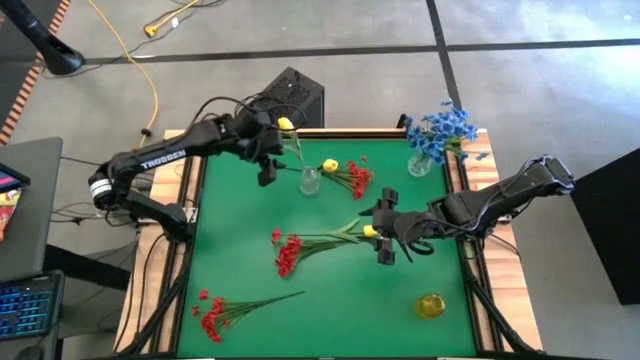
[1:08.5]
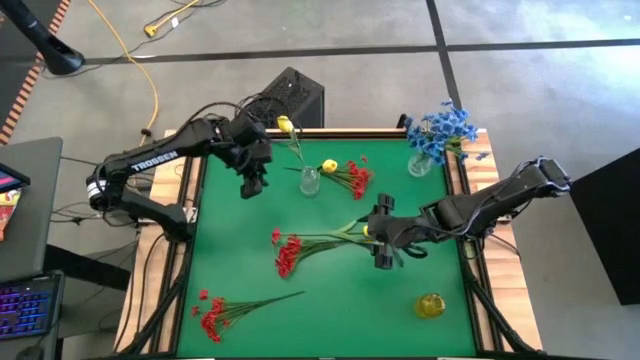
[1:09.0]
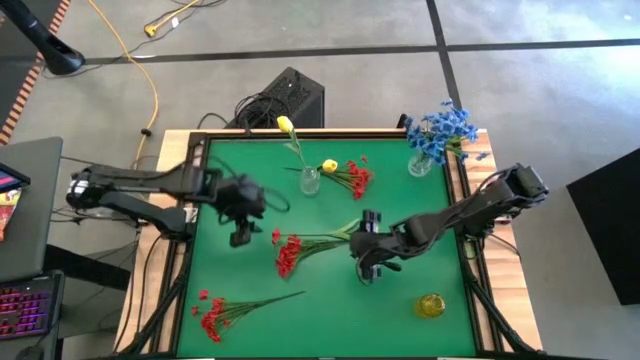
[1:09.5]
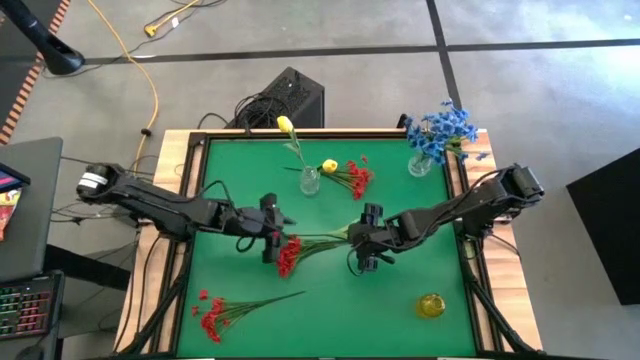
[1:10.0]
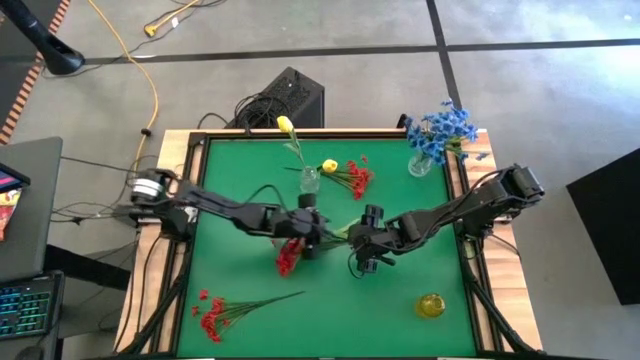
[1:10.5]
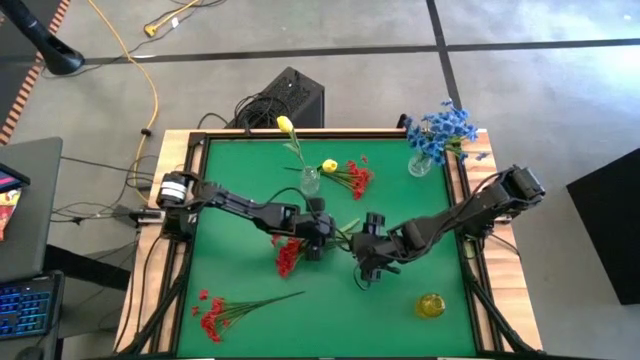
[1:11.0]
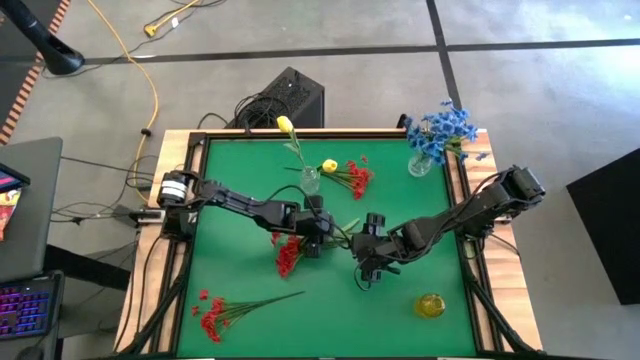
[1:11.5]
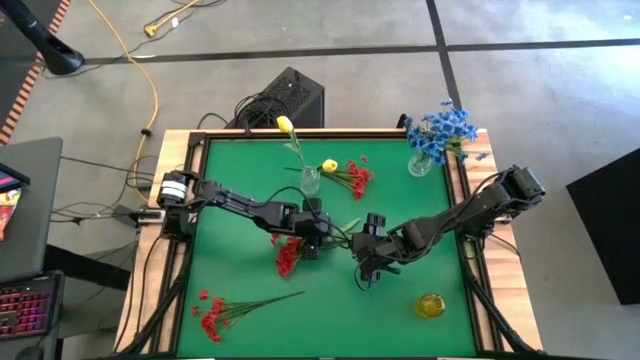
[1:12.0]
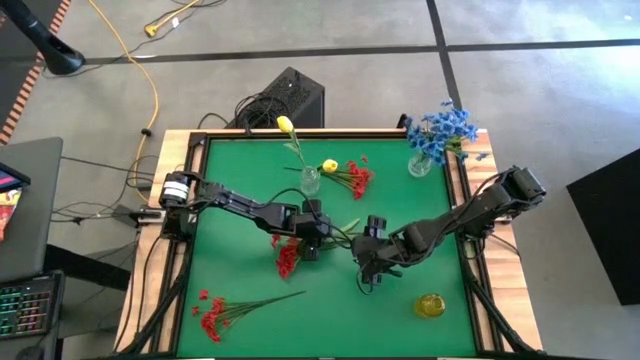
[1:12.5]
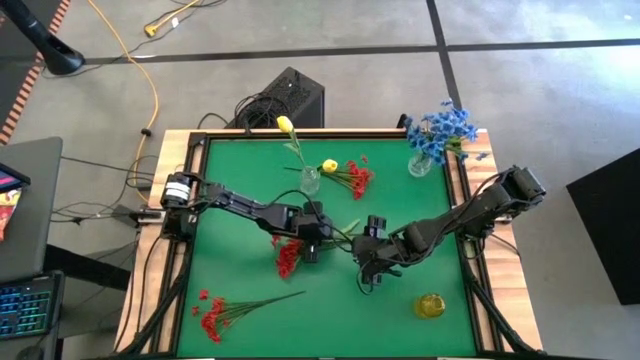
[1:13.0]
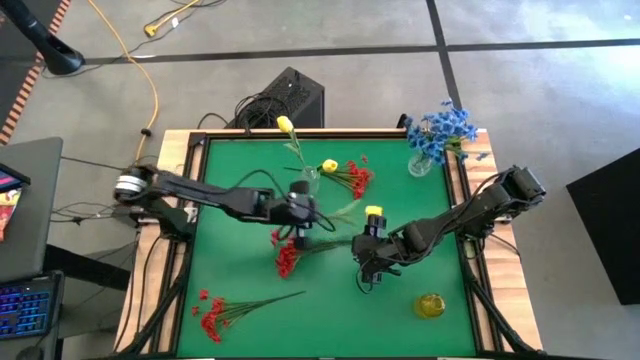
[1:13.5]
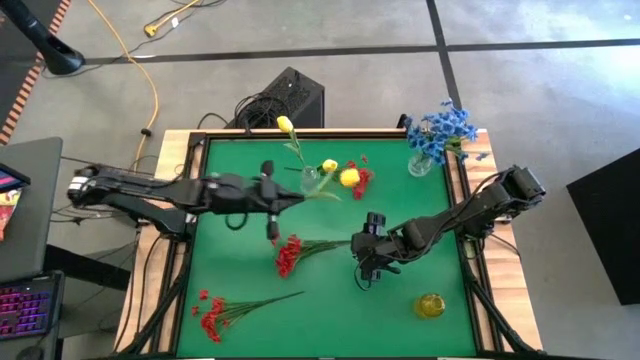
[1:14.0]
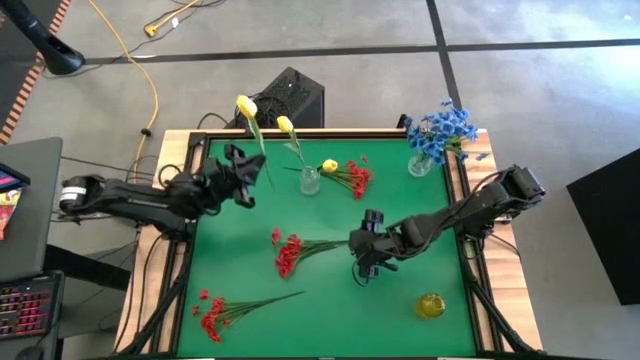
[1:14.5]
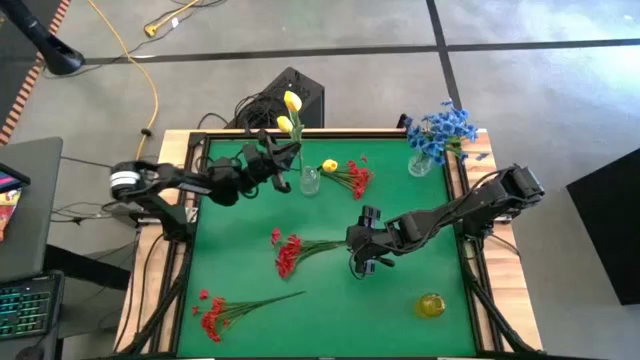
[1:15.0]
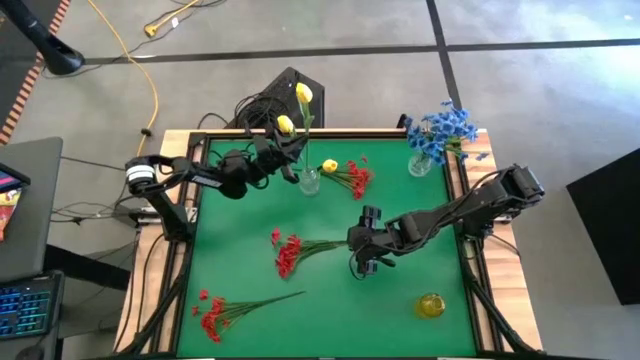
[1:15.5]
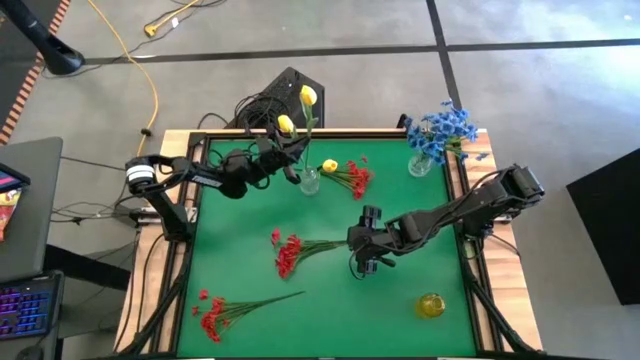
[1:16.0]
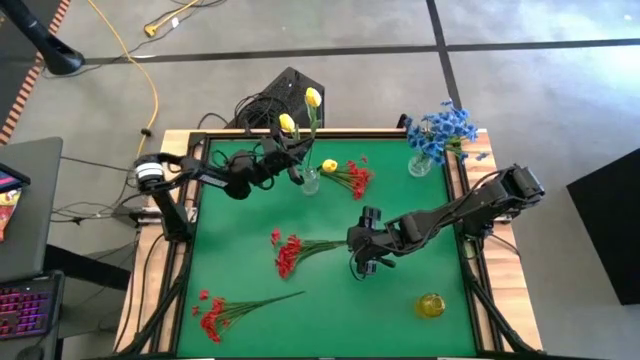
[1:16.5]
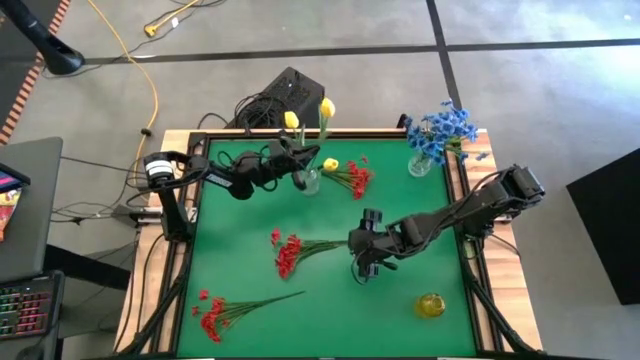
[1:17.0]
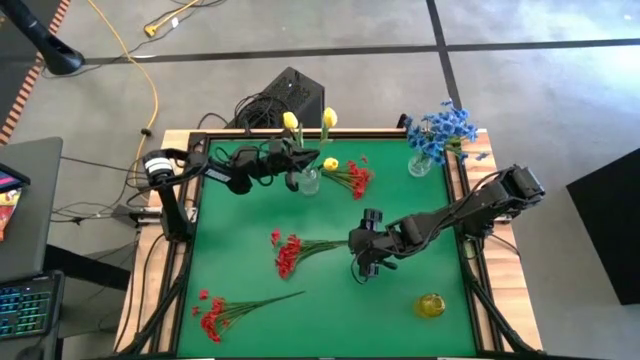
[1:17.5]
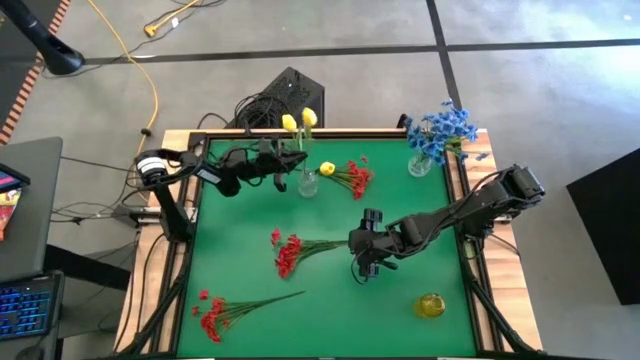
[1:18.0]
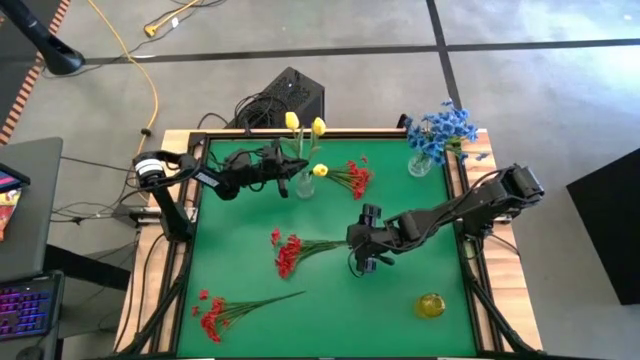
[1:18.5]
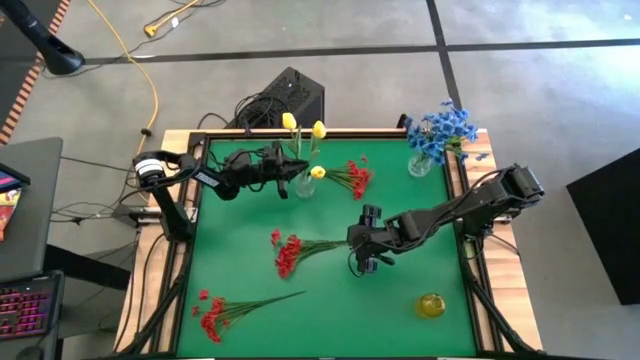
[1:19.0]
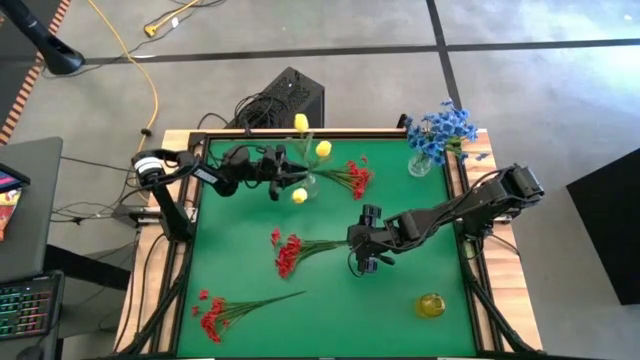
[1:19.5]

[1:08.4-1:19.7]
Task: Sort flowers into vase by color
Put the yellow tulip into the left transparent vase

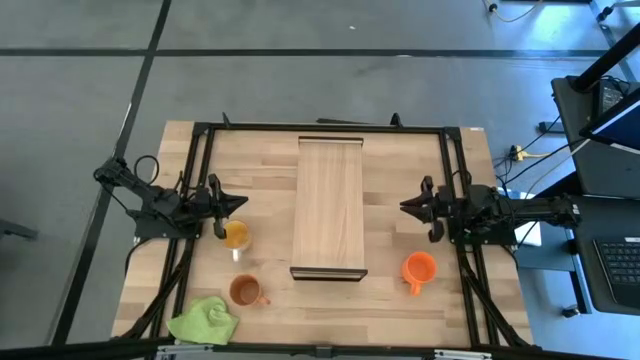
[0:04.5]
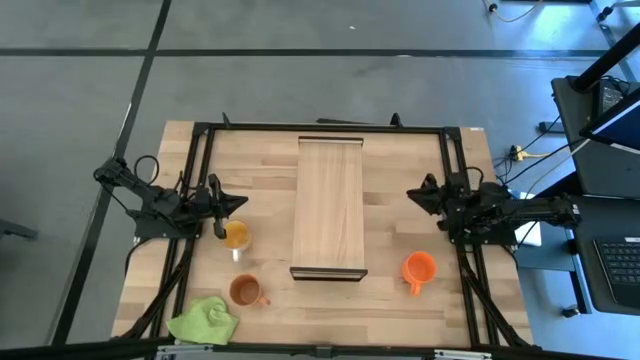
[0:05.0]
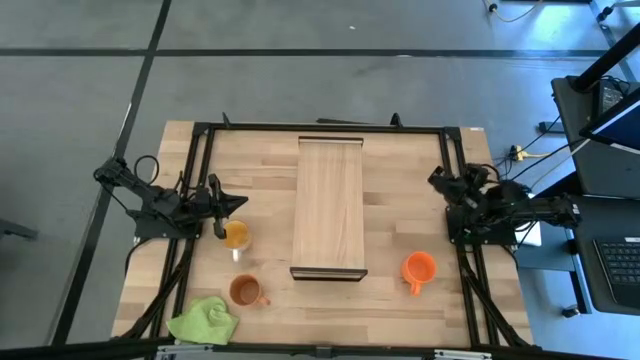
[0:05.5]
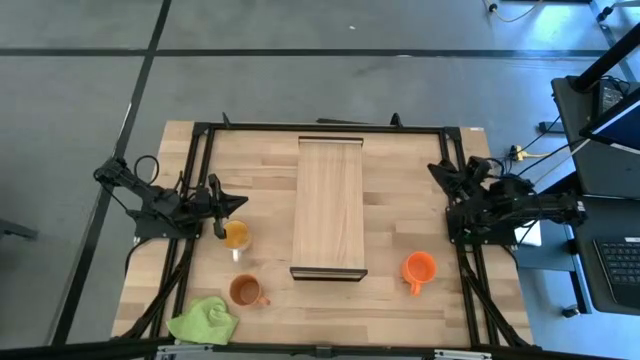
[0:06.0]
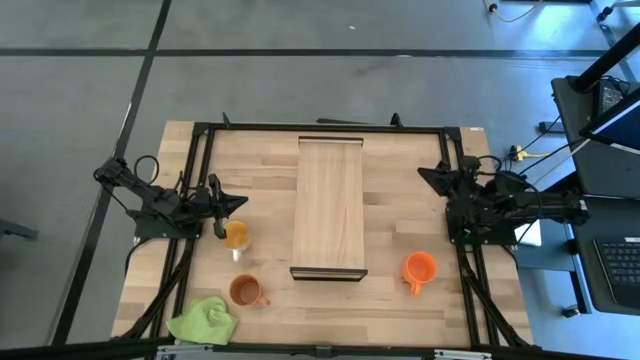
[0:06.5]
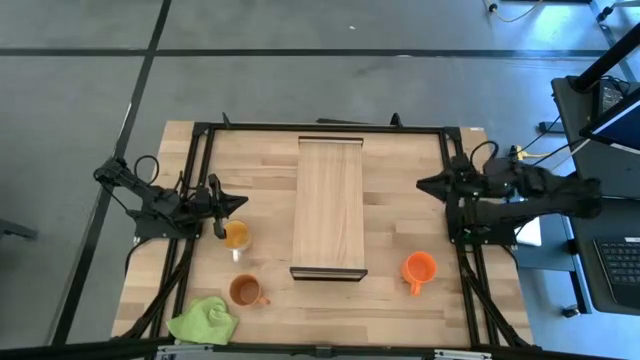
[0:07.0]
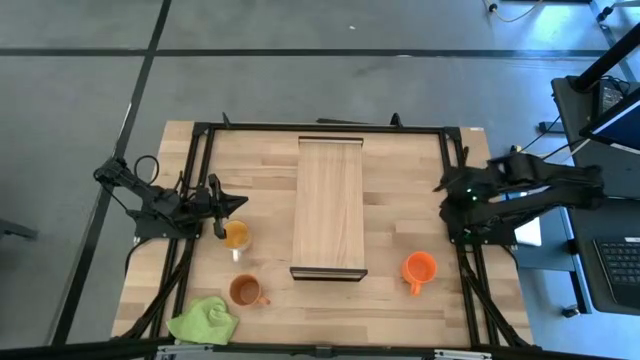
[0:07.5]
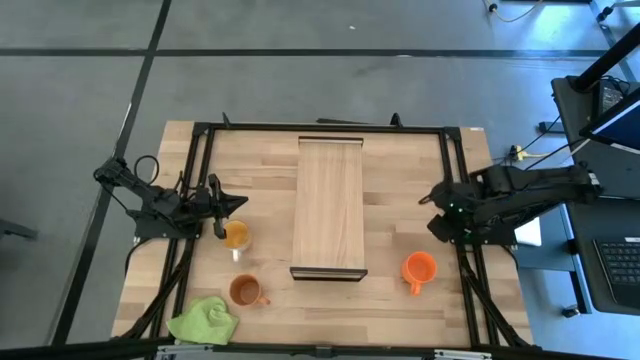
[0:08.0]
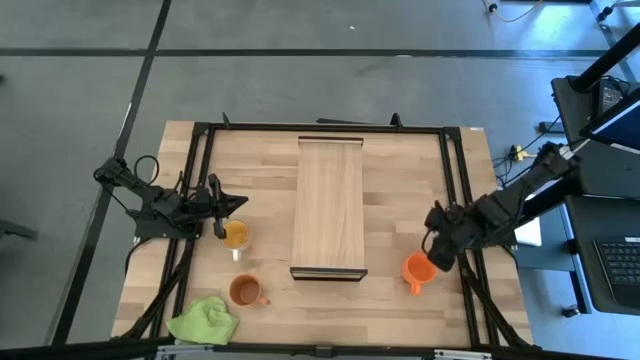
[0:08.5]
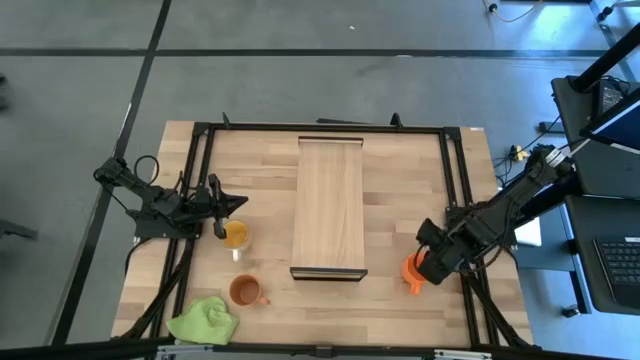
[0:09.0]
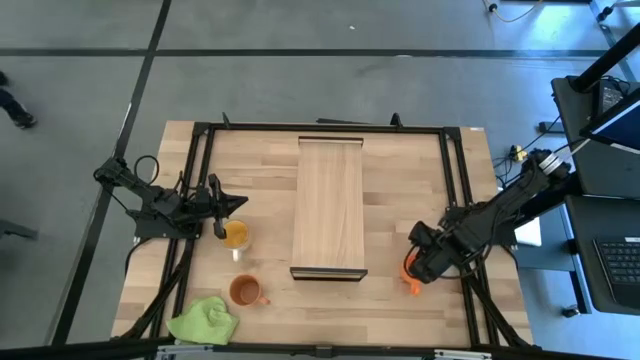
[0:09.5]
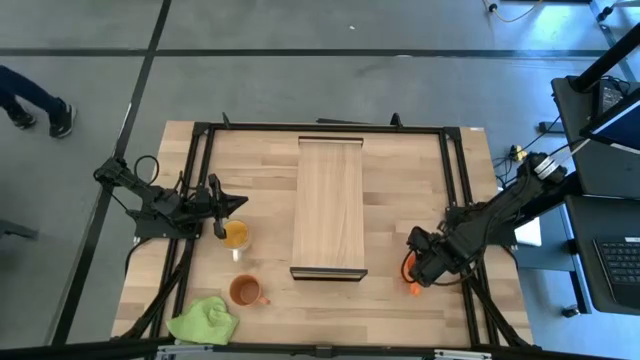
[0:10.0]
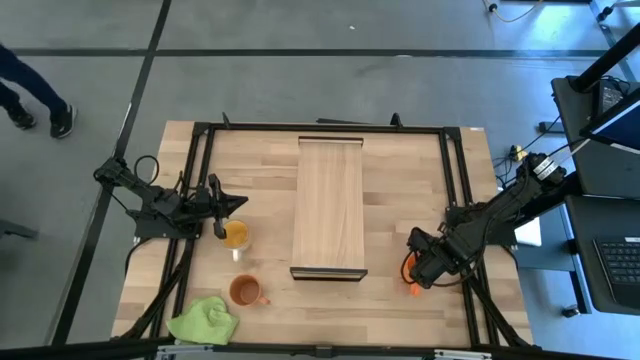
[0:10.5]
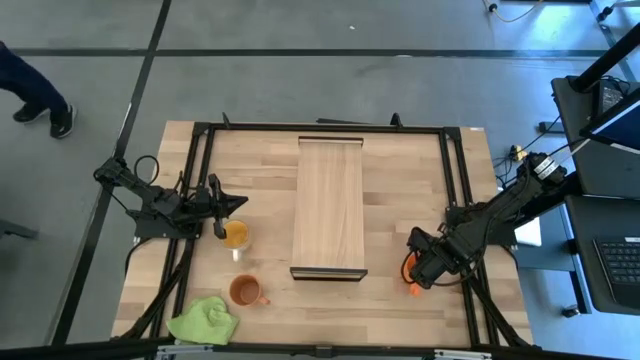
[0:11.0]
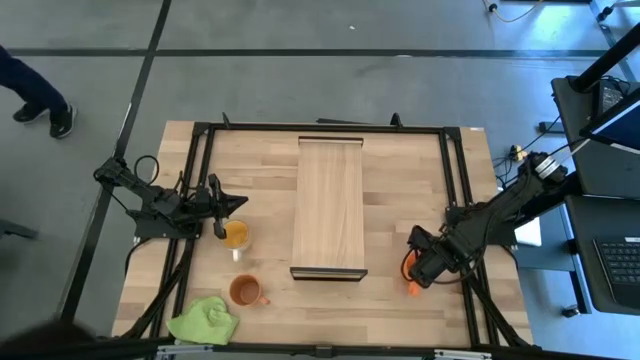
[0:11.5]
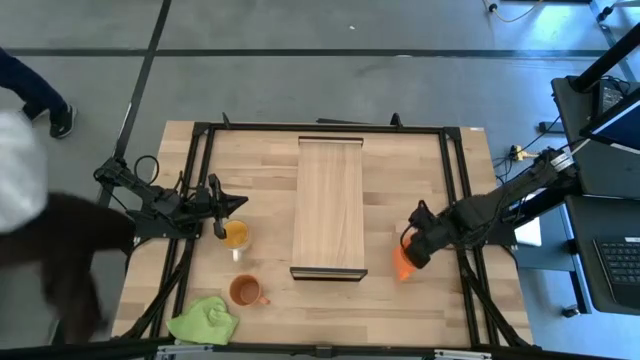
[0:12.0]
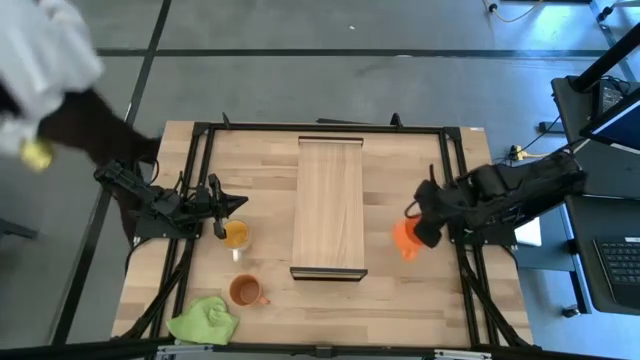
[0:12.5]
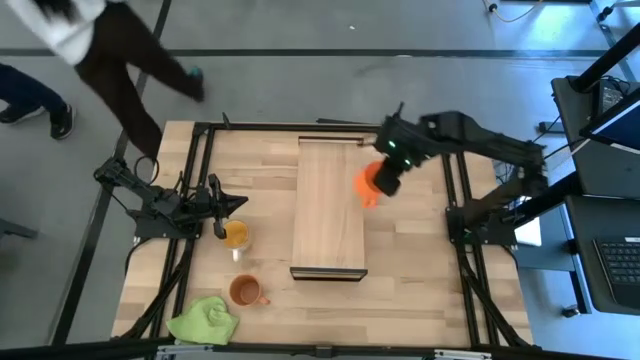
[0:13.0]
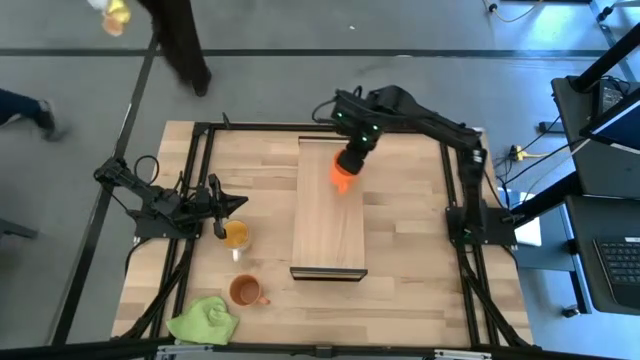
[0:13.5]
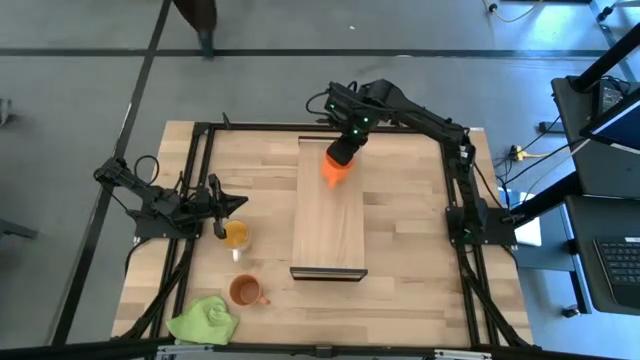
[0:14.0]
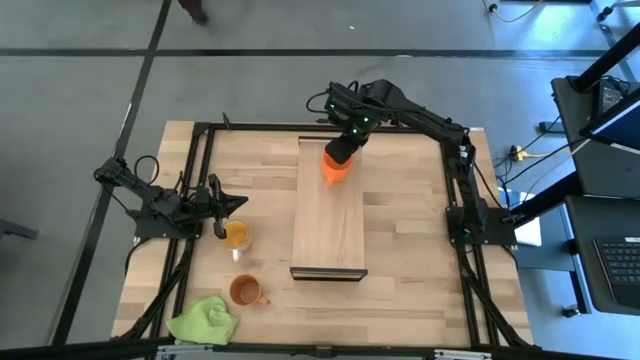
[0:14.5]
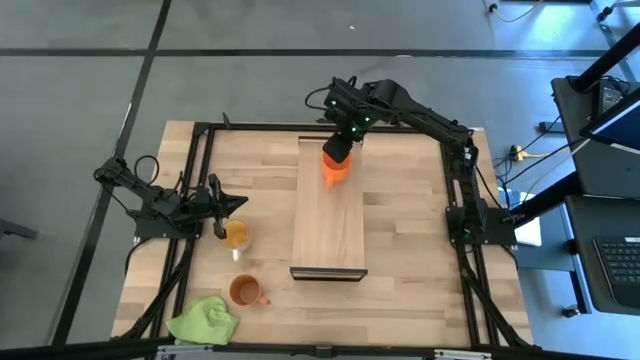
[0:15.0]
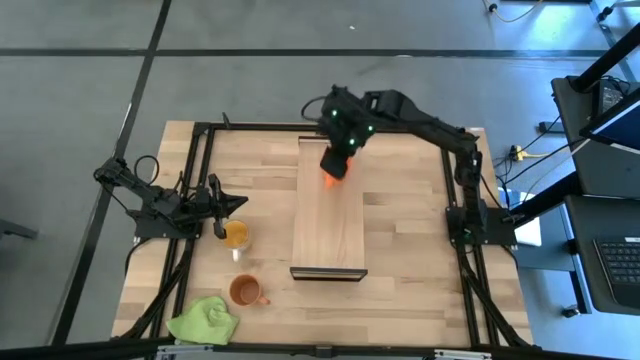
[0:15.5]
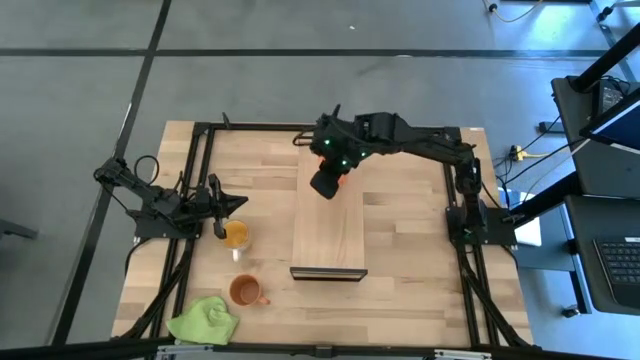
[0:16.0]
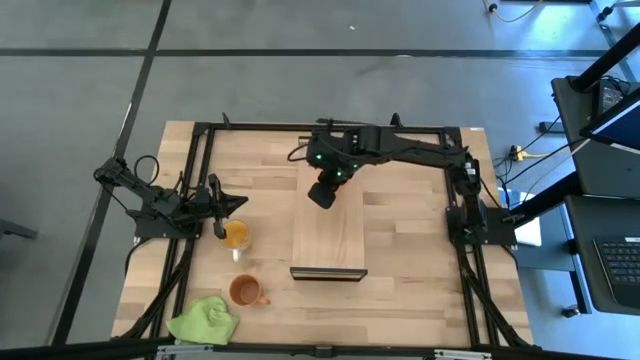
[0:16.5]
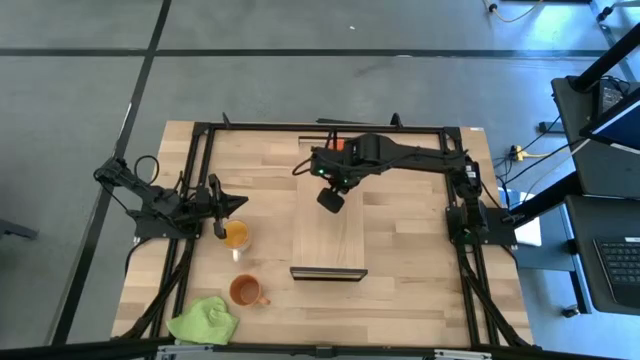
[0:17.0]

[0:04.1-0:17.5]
Task: Stack small to large cups/mugs on shelf
Put the orange mug on the shelf
